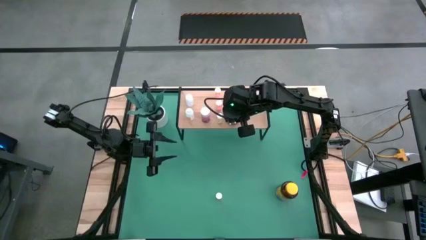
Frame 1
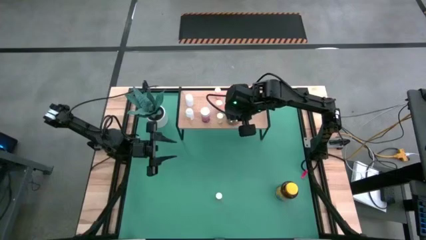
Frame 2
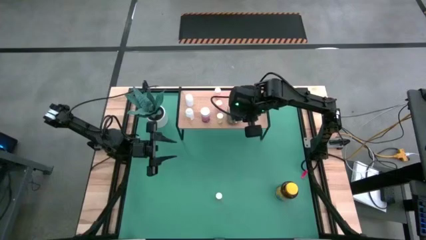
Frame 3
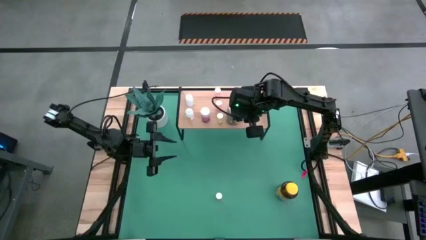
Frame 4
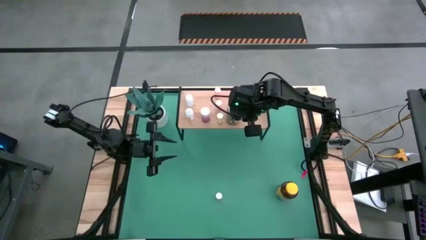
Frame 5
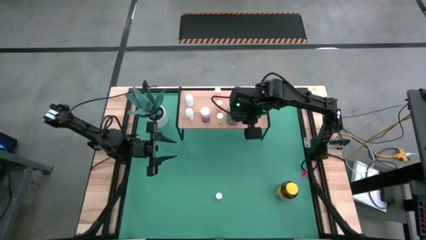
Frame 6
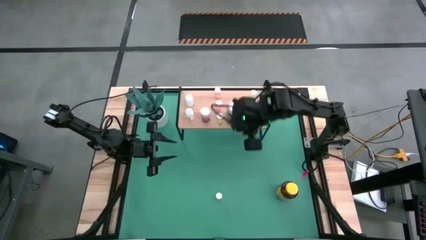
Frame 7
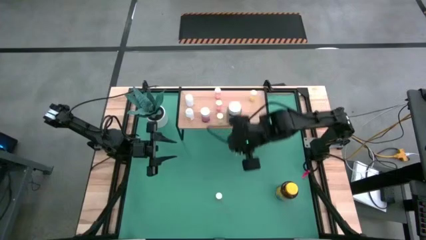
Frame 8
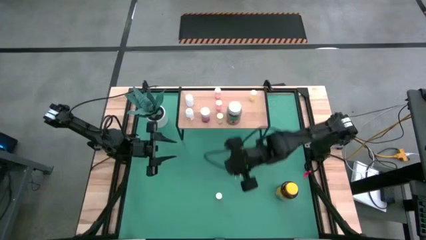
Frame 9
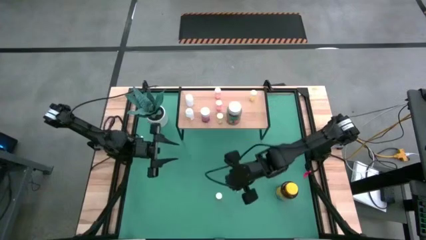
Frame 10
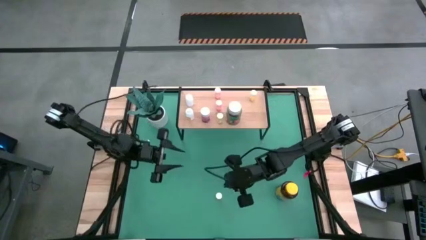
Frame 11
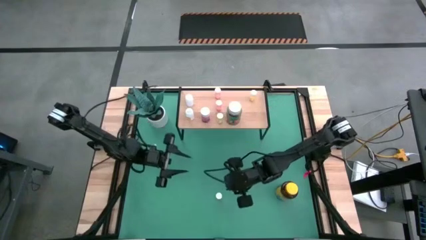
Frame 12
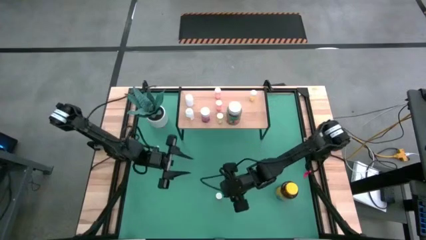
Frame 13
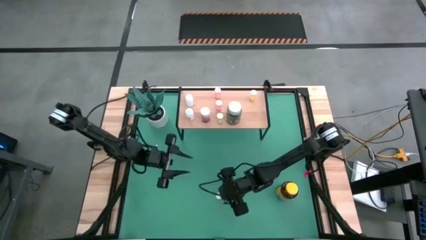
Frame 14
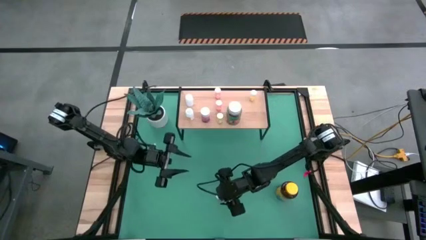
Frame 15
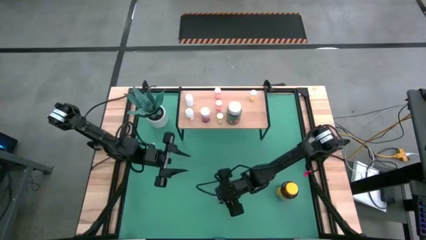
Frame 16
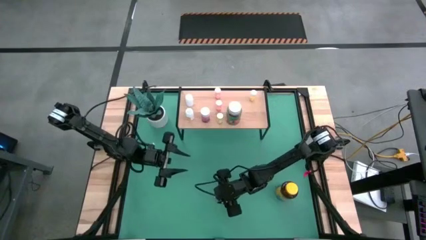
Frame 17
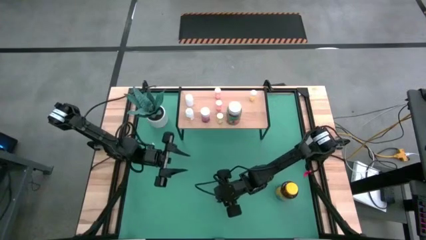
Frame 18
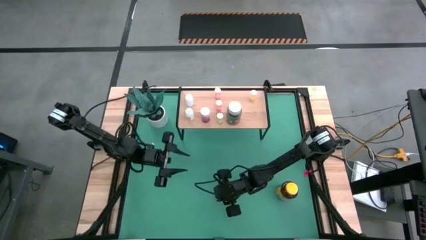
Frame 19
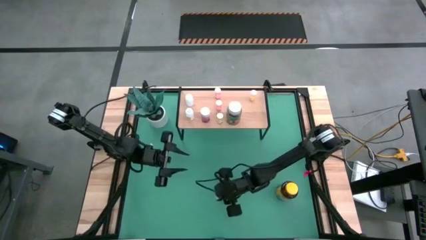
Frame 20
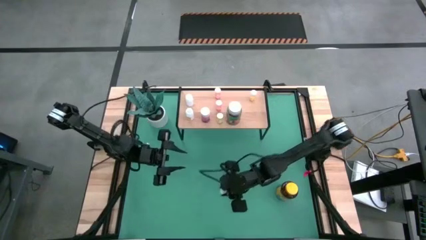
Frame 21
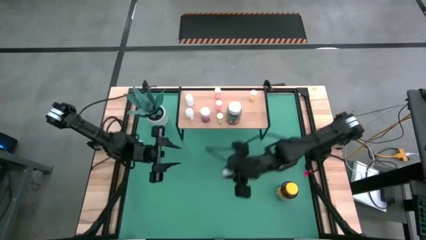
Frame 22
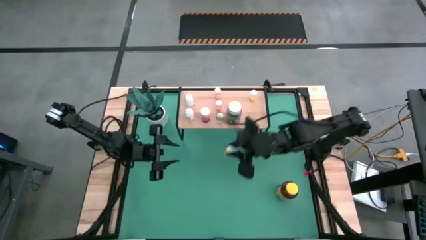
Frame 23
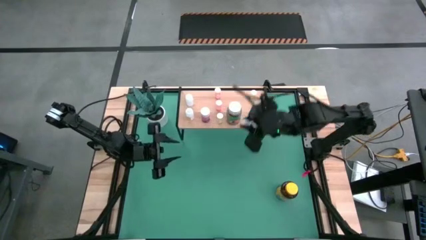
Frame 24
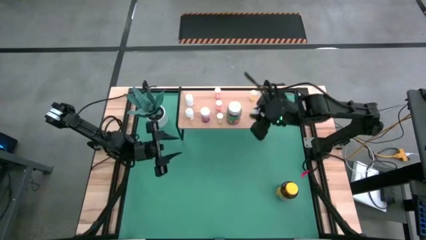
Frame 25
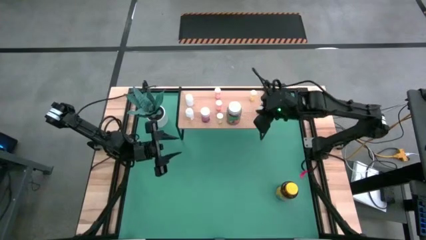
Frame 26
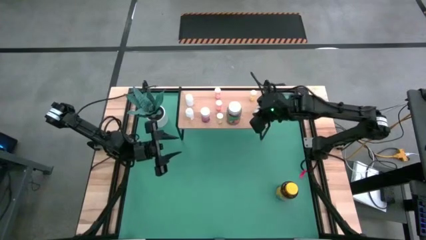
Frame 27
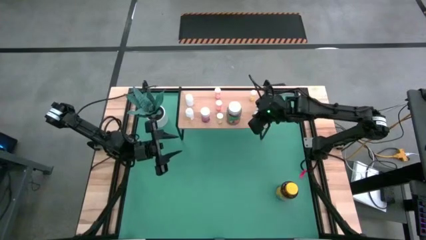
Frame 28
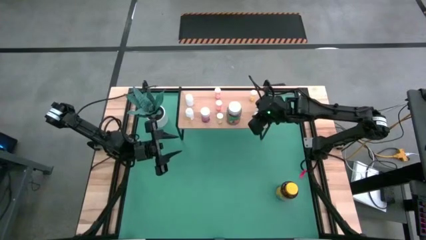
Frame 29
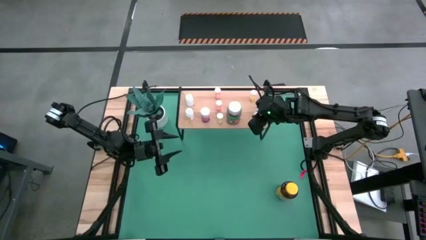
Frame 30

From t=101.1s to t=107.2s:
Task: Pick and place medicine bottles onto shelf by color
Put the orange pill bottle on the shelf

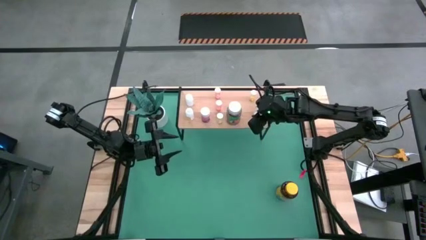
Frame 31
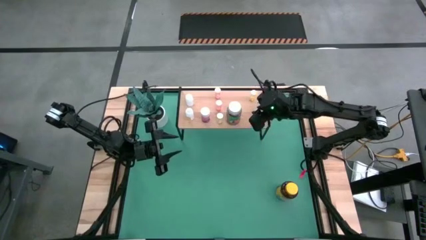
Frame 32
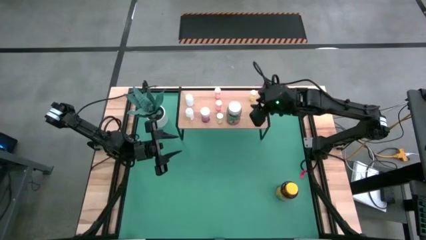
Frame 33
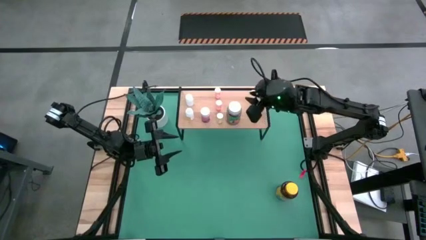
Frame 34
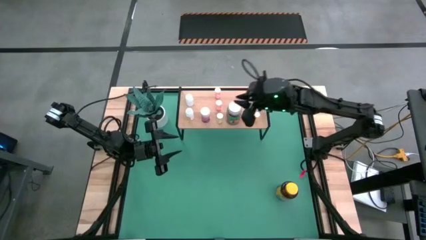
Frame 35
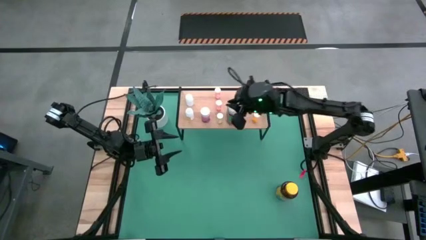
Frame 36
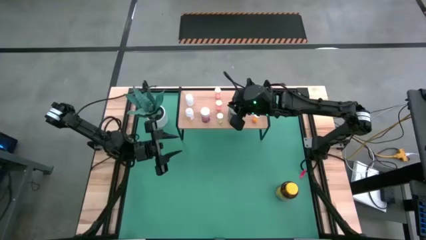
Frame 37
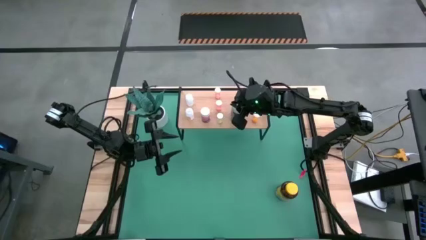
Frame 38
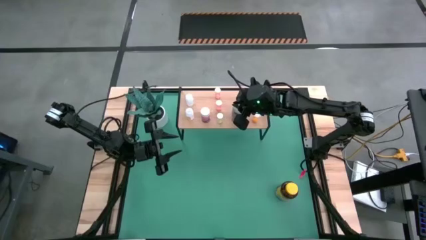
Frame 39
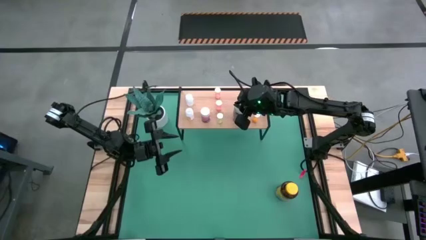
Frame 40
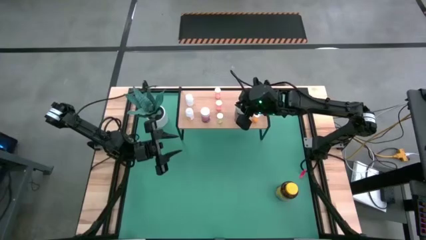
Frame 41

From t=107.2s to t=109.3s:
Adjust the green pill bottle on the shelf

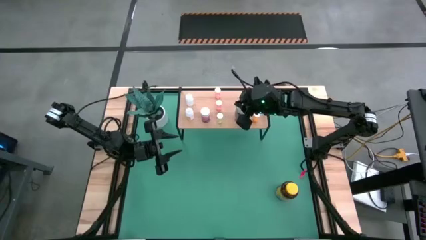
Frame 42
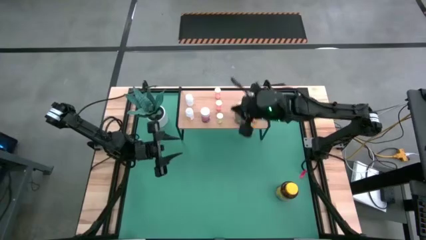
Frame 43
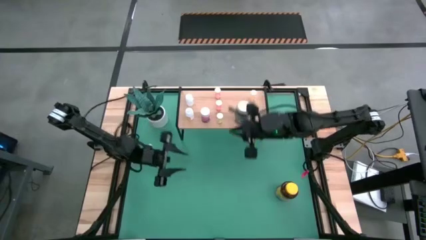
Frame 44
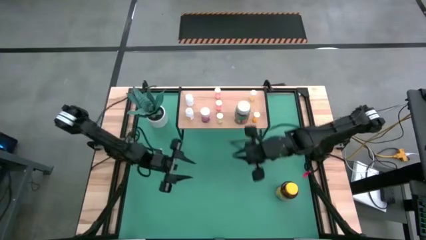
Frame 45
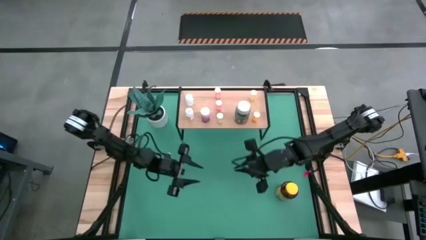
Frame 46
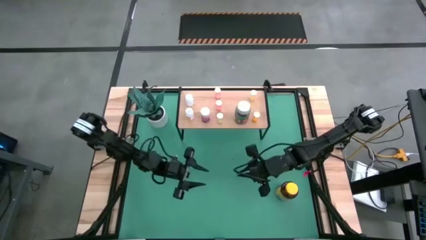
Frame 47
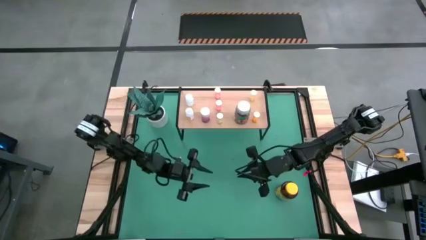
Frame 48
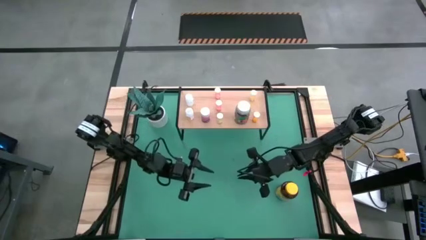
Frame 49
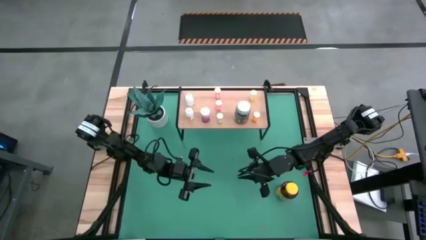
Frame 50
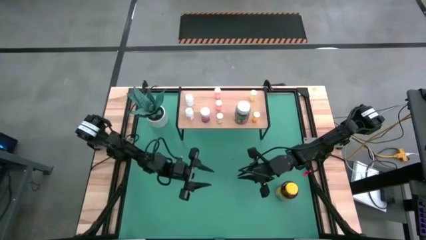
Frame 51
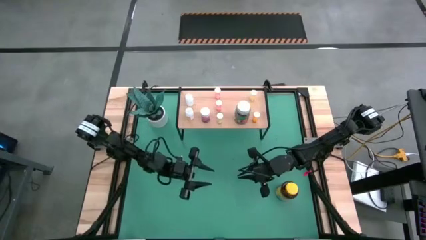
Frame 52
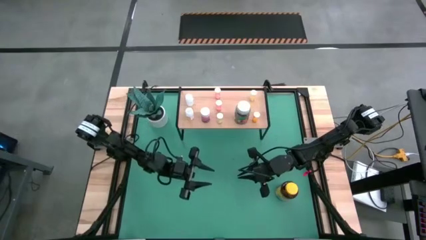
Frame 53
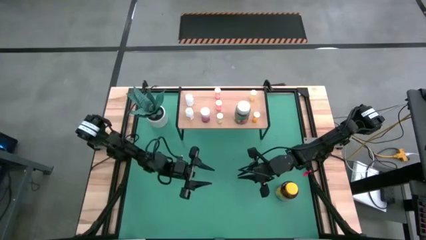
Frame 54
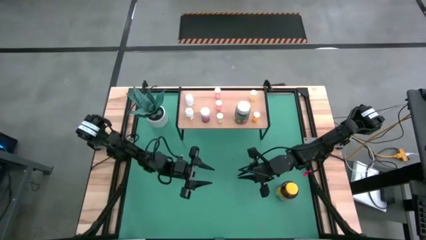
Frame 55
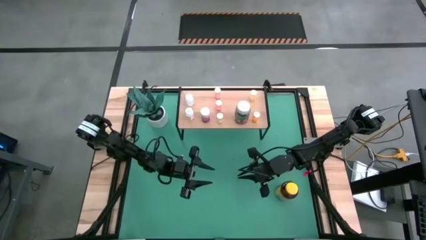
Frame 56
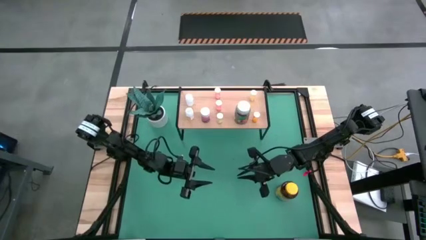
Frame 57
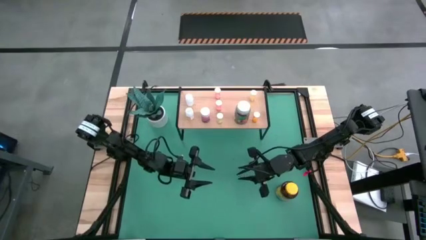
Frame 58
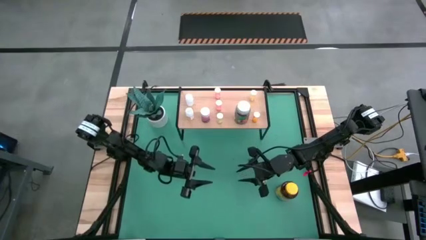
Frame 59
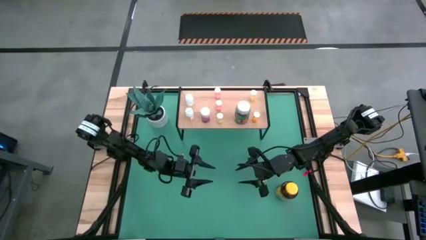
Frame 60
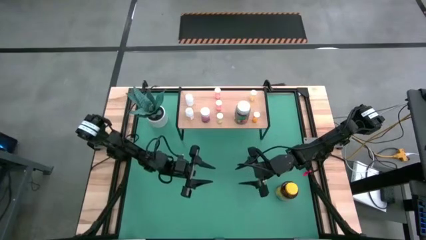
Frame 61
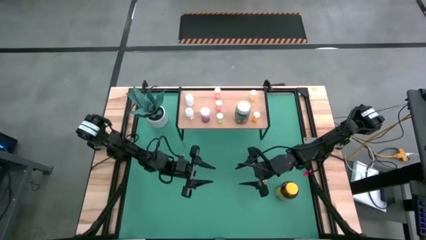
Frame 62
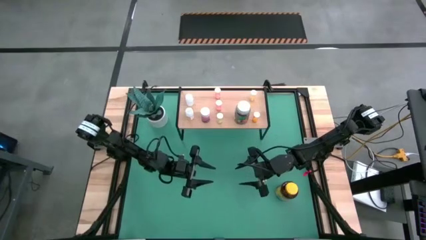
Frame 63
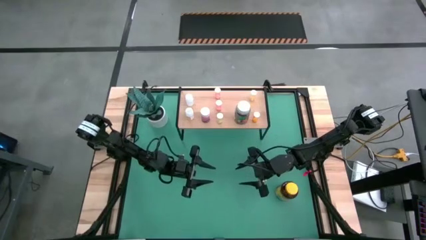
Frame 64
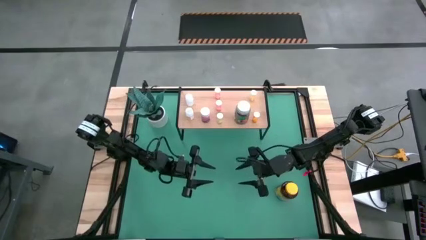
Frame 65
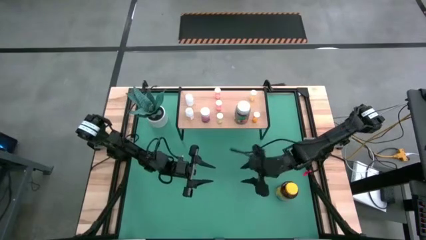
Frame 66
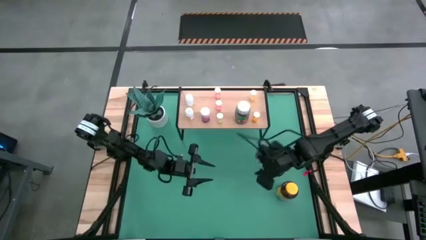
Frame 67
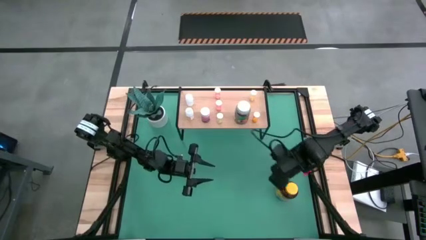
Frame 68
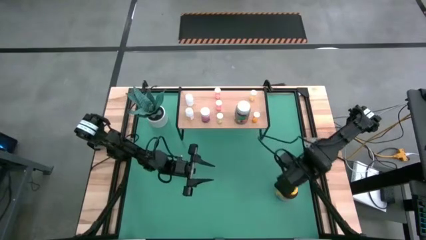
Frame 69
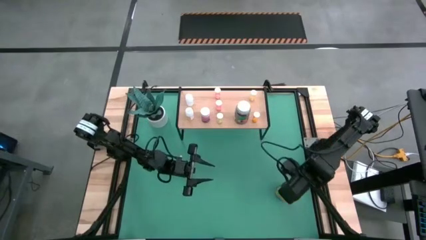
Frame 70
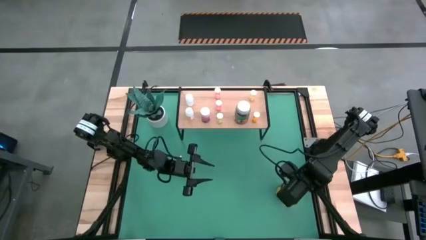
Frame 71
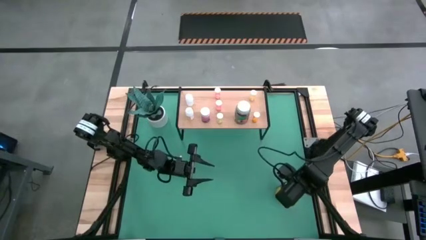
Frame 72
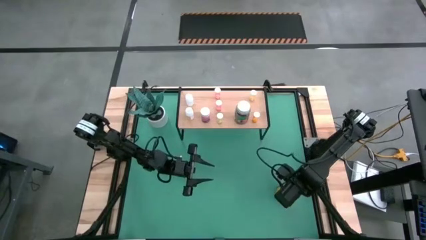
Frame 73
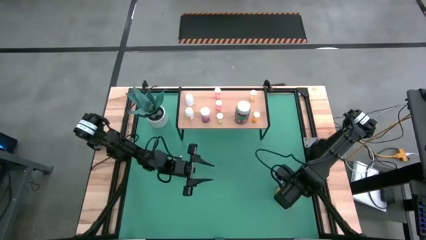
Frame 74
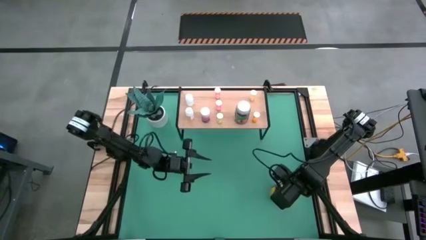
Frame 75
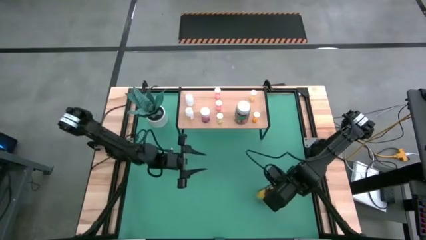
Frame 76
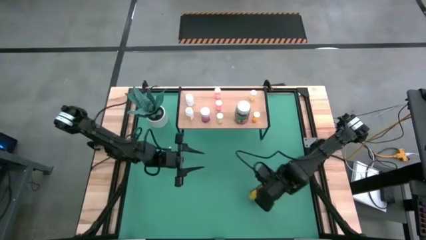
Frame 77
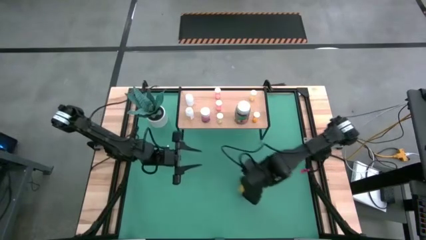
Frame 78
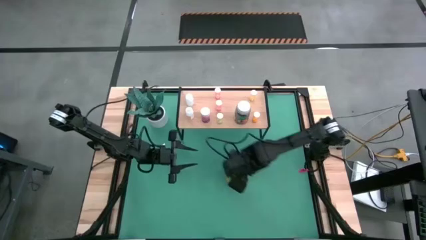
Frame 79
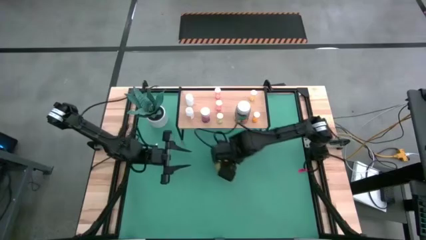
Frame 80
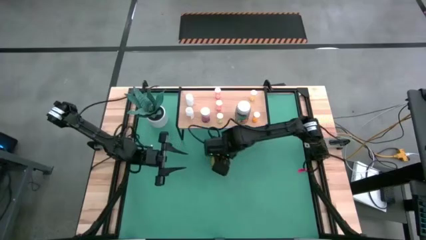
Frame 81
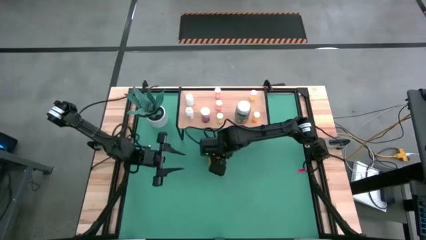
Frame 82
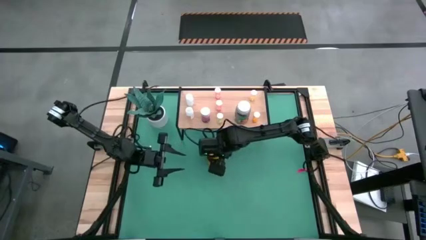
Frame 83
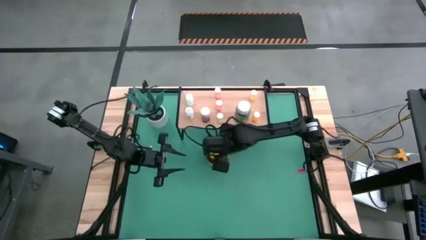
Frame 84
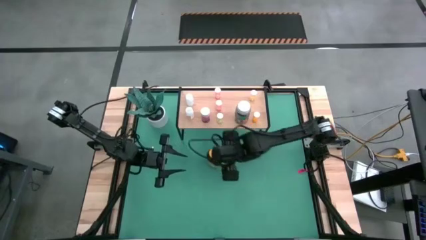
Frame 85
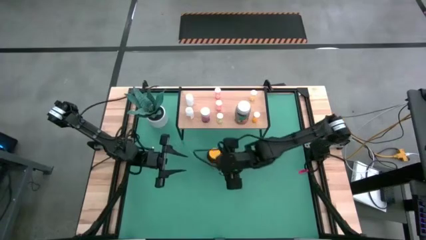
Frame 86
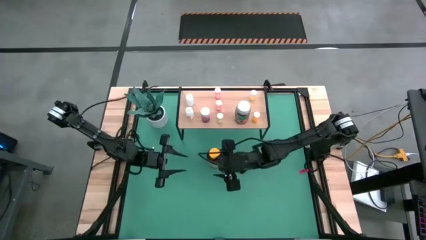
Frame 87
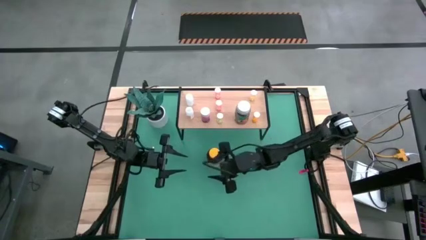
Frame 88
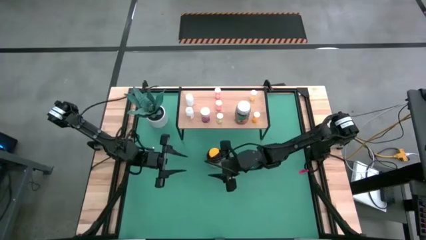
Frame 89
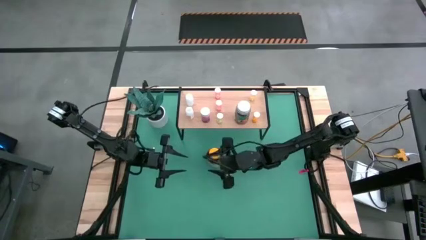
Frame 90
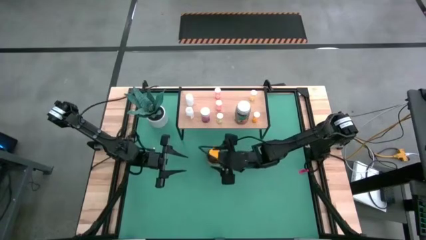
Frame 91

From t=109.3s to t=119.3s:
Put the yellow and brown pill bottle on the shelf
